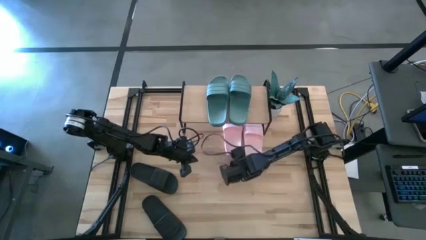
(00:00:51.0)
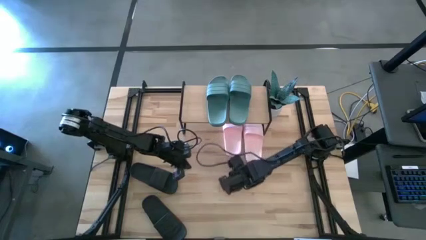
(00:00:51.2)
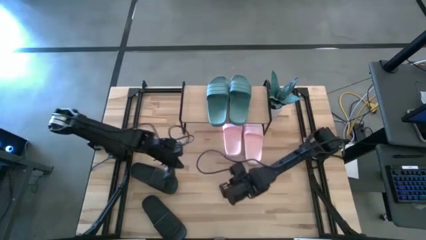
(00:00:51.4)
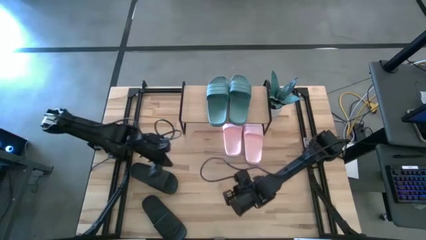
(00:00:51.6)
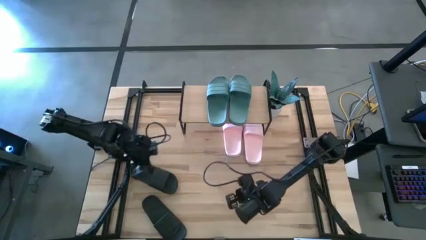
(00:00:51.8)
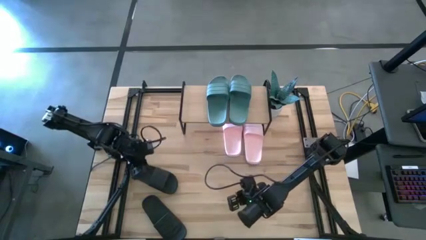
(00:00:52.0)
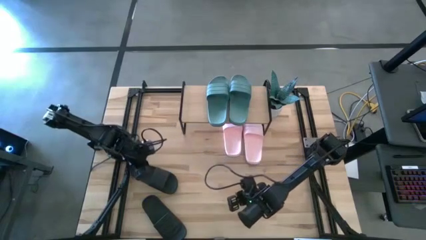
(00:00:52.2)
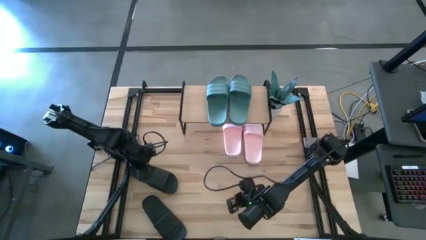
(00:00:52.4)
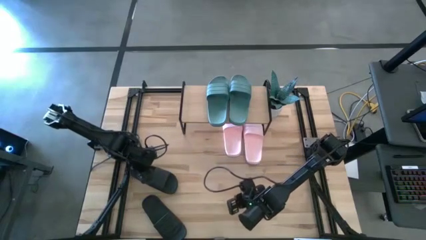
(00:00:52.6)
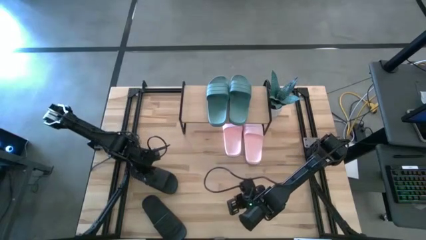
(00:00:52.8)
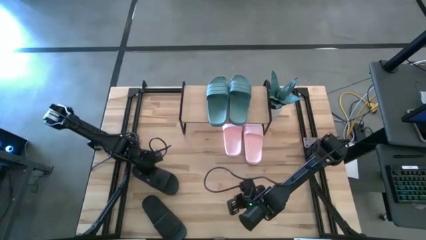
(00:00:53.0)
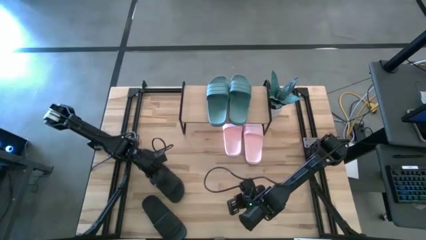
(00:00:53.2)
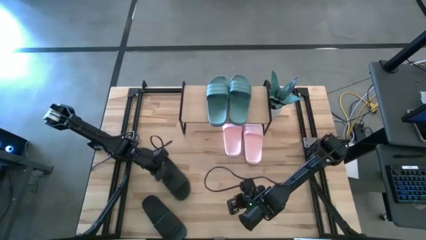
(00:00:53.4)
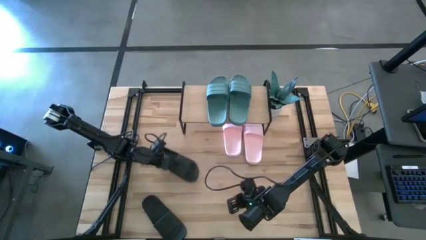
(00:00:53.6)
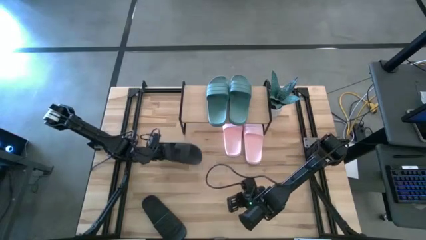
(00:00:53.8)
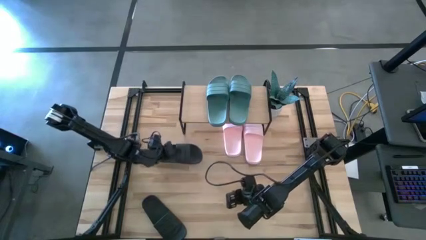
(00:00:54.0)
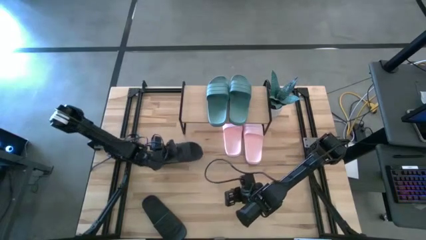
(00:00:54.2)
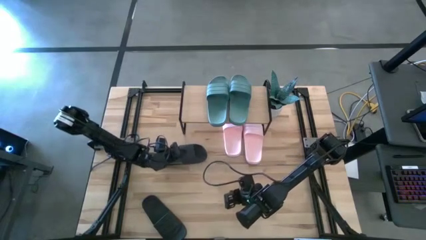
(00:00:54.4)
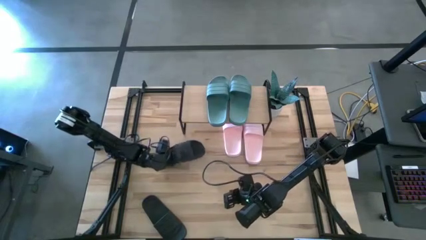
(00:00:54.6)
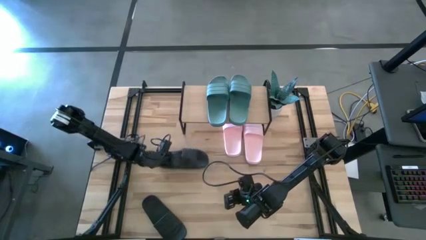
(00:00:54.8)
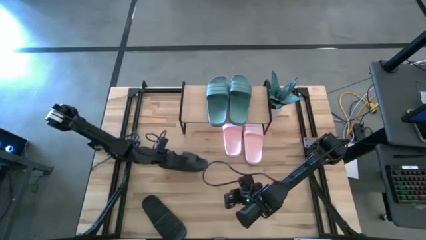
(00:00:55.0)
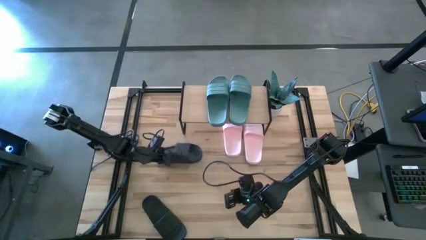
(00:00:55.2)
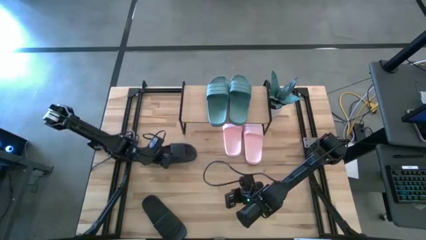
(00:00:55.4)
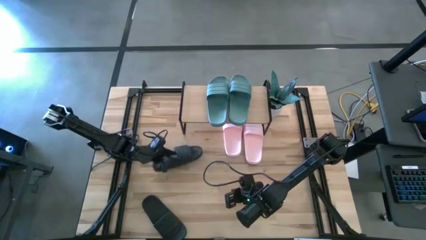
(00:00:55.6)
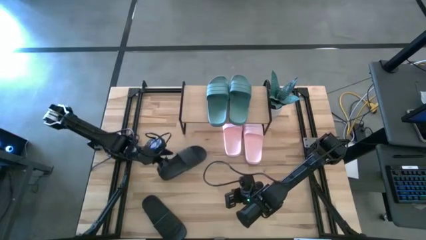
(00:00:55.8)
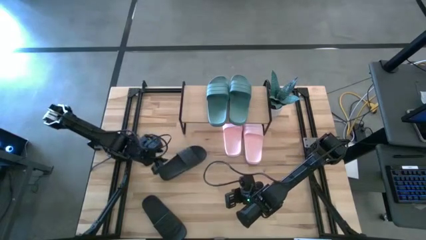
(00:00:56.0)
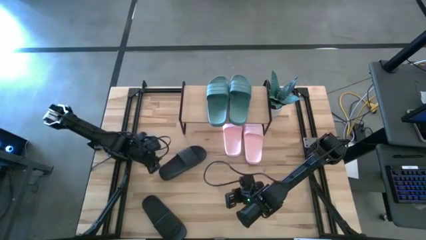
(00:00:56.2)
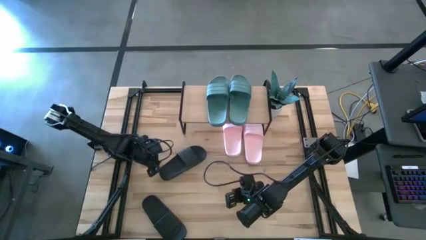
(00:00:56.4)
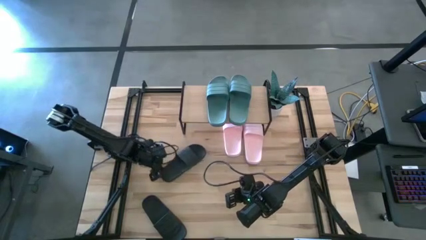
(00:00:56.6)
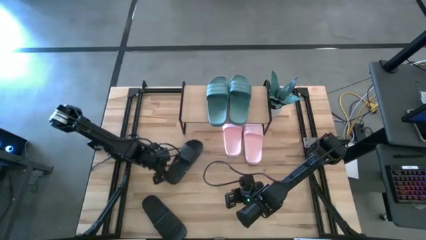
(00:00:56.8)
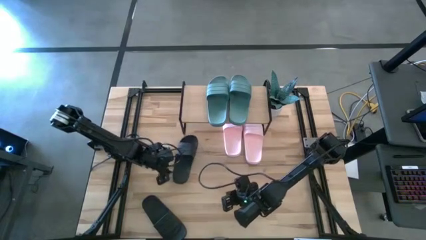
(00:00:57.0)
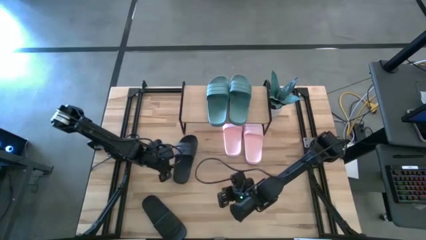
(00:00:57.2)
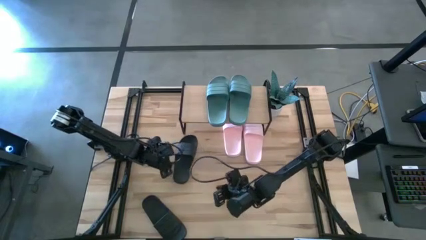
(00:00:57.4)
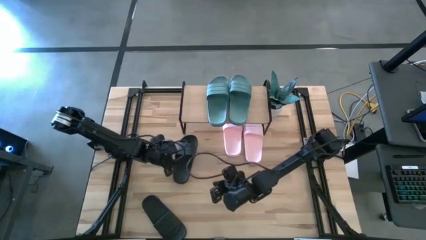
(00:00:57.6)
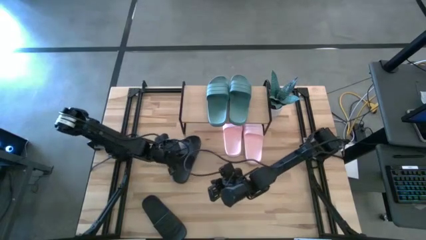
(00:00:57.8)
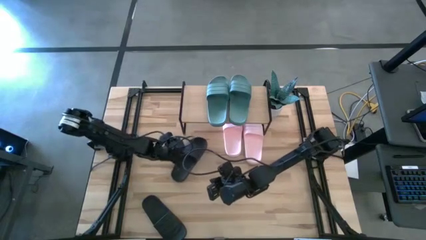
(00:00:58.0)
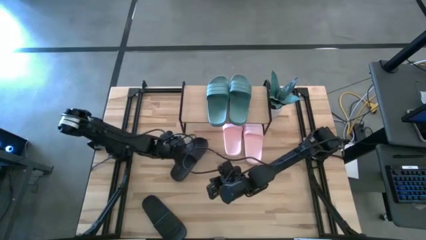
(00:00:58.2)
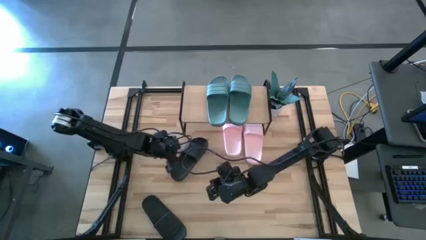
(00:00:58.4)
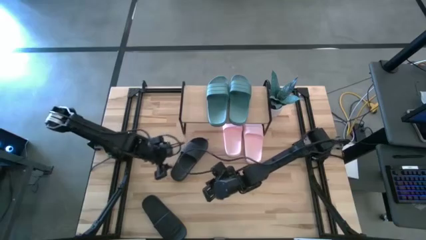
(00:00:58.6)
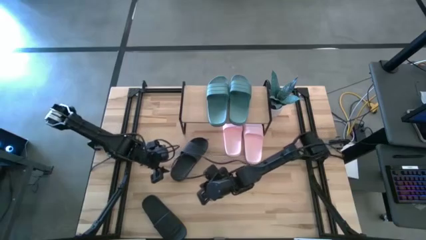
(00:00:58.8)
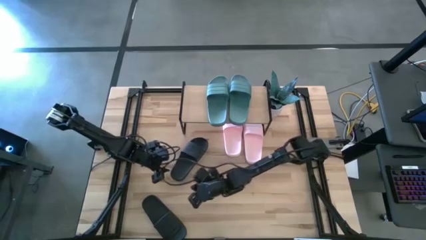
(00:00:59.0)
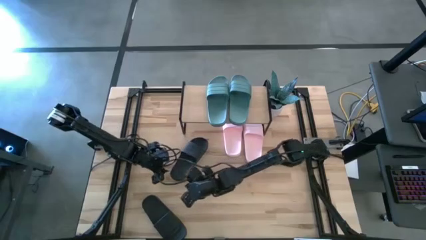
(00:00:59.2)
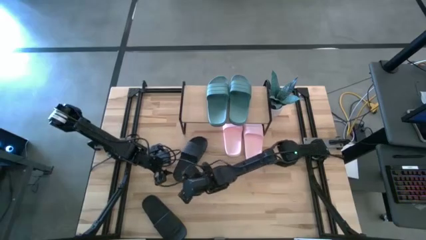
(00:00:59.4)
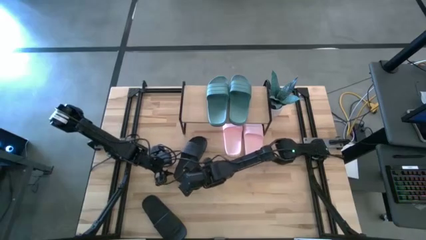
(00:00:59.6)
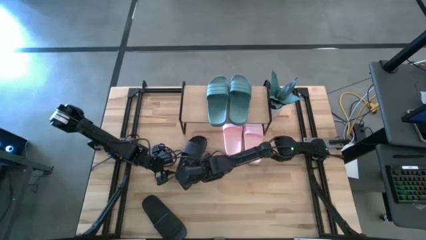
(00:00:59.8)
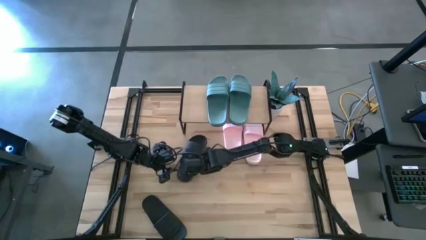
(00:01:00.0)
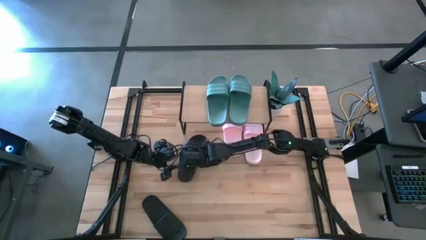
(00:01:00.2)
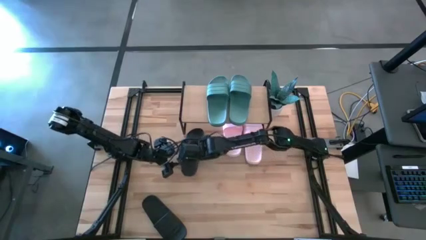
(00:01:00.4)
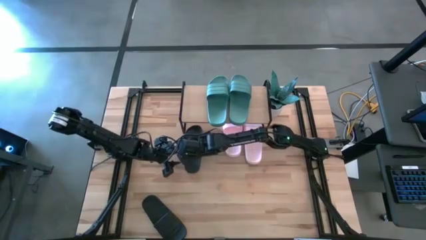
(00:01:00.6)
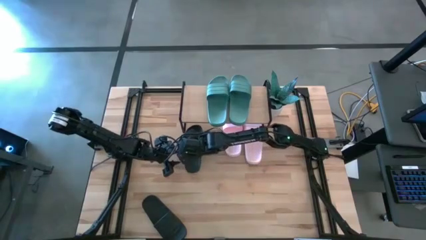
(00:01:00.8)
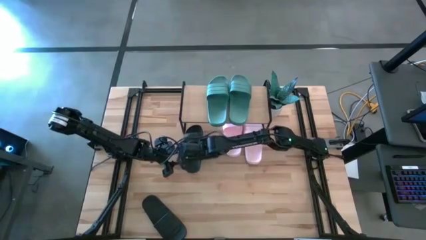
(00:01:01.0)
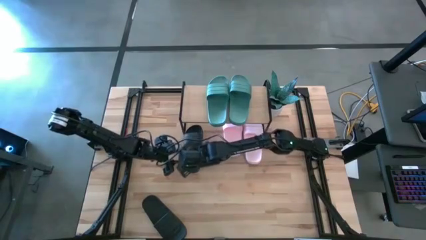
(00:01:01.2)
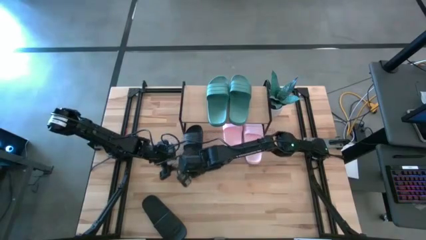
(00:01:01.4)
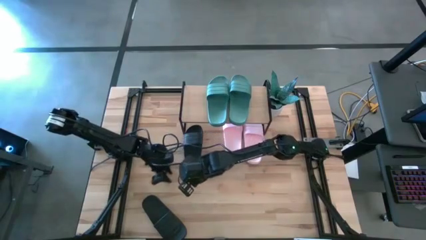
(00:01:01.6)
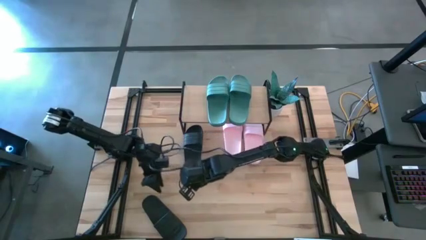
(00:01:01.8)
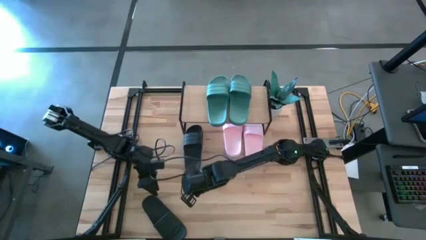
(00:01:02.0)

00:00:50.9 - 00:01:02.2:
Task: Pick and place slides into the shelf
Prepare the black pair of slides
